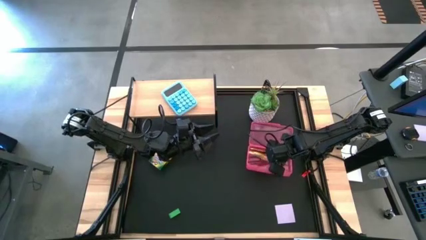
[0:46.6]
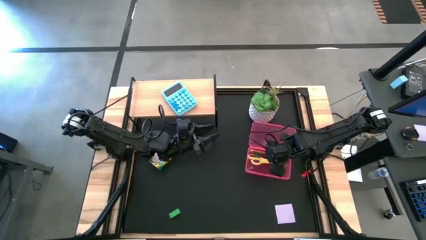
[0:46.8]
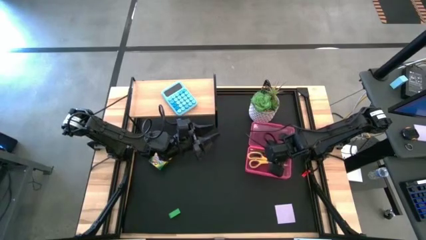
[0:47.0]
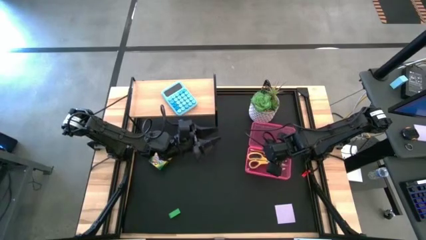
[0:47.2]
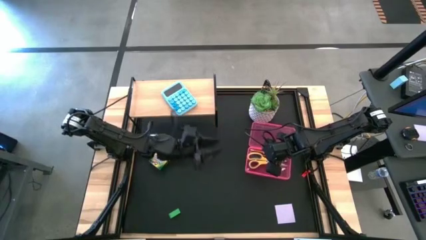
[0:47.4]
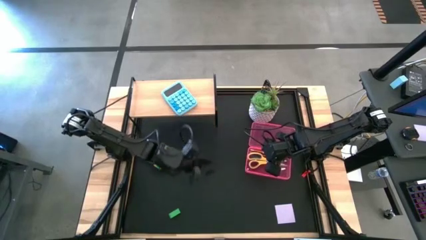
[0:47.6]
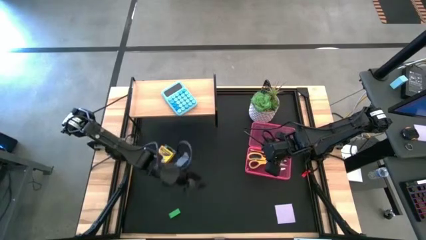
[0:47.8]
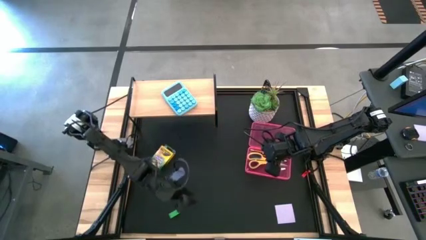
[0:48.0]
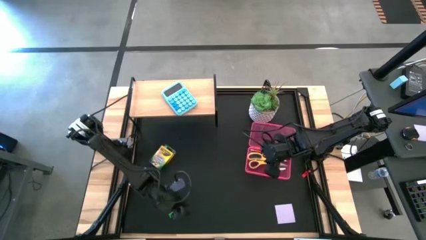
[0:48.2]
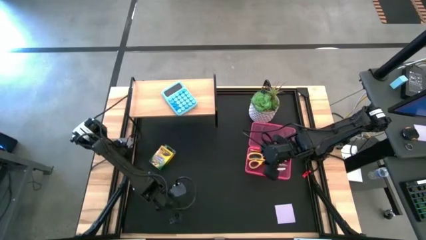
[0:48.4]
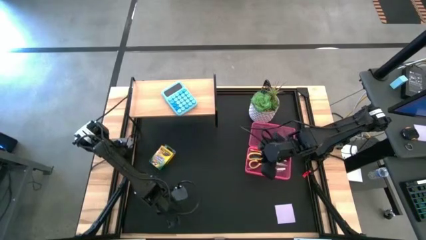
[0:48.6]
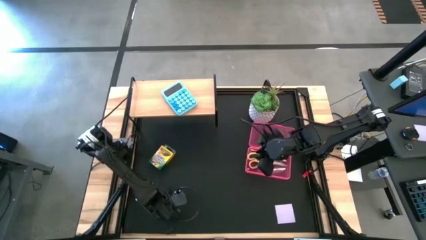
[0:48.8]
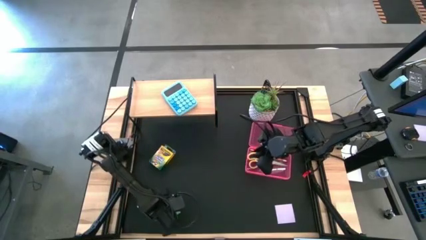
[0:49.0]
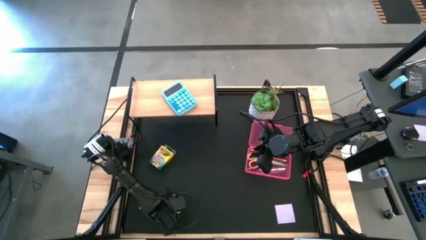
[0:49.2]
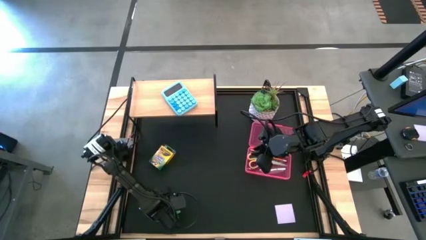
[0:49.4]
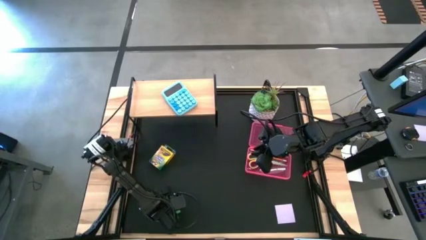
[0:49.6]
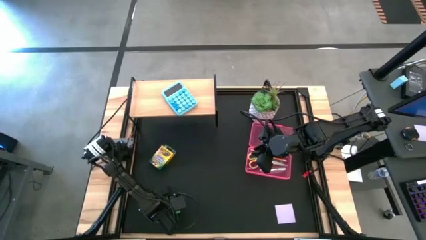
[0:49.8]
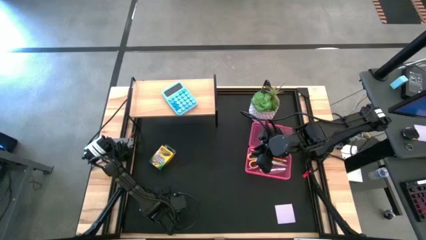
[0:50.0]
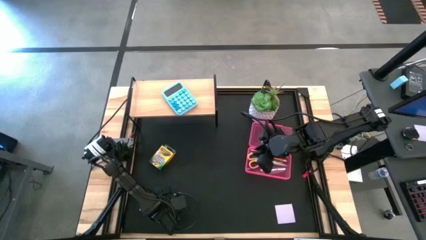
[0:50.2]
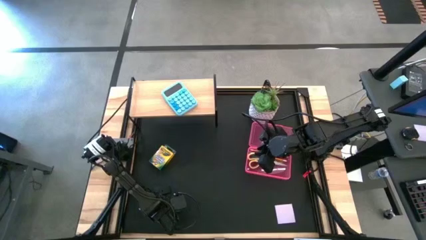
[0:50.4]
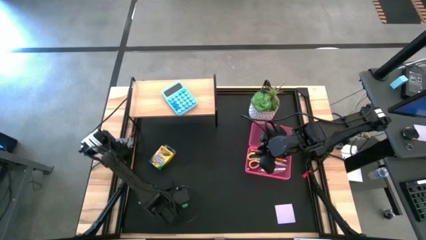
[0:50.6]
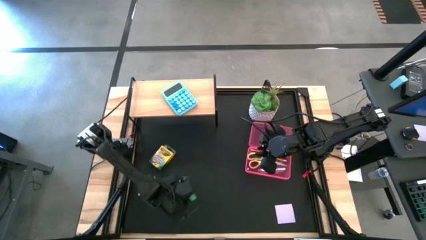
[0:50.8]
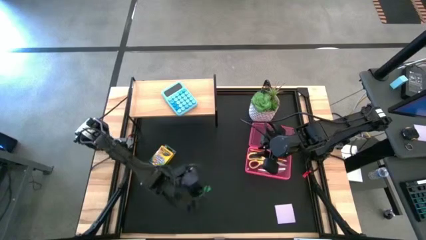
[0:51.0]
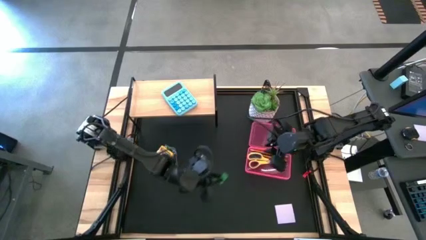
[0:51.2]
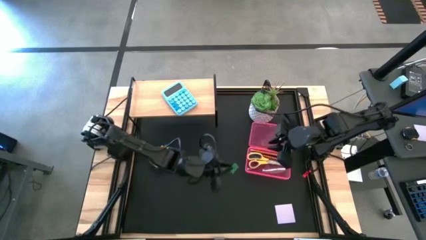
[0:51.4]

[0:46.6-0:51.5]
Task: Pack school essentials
Put the green eraser into the pink supply box

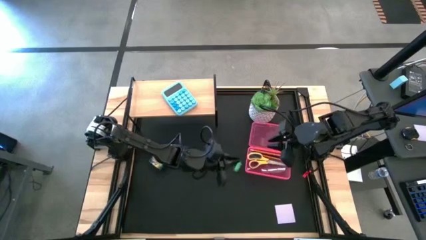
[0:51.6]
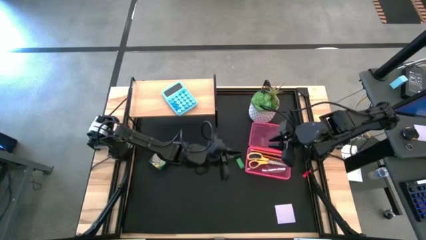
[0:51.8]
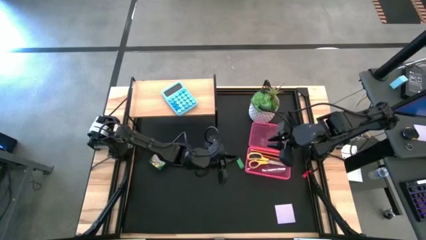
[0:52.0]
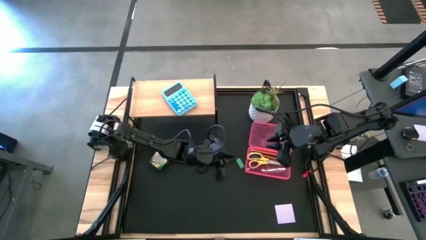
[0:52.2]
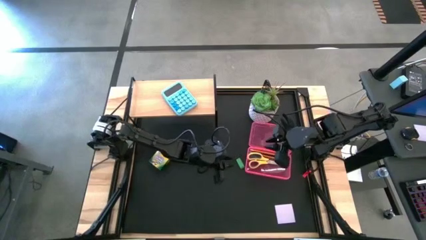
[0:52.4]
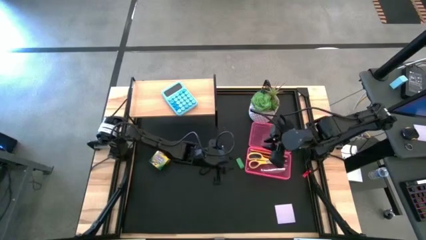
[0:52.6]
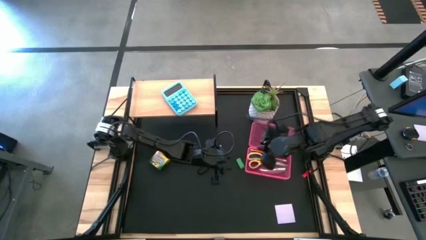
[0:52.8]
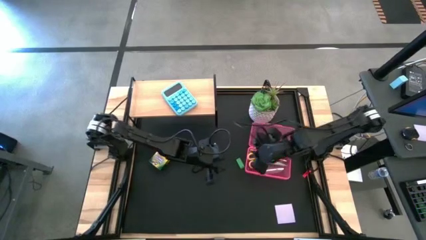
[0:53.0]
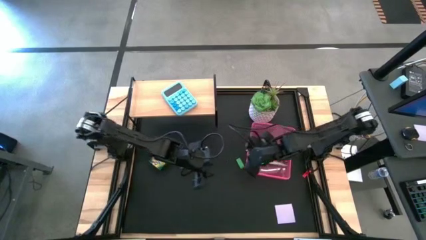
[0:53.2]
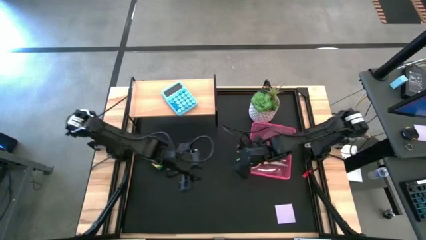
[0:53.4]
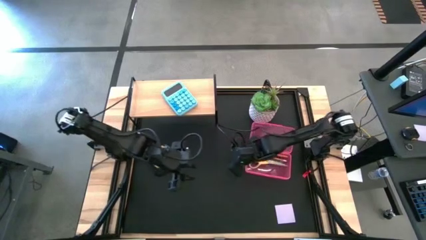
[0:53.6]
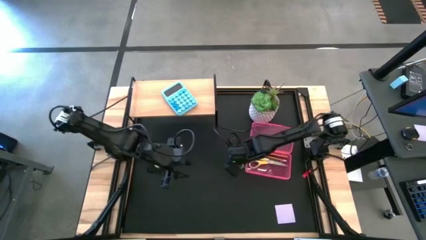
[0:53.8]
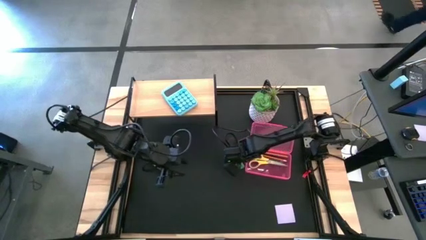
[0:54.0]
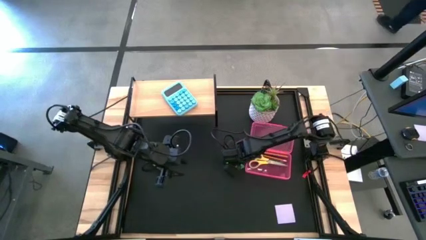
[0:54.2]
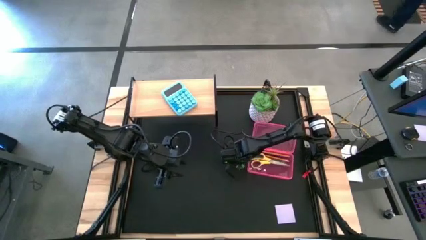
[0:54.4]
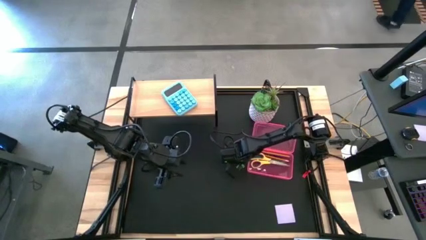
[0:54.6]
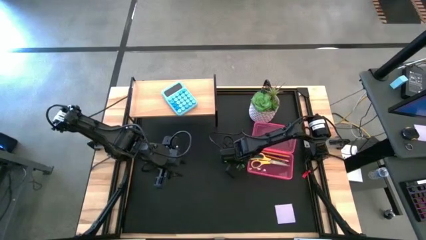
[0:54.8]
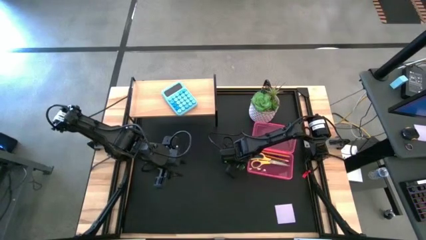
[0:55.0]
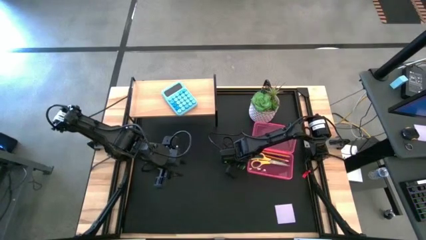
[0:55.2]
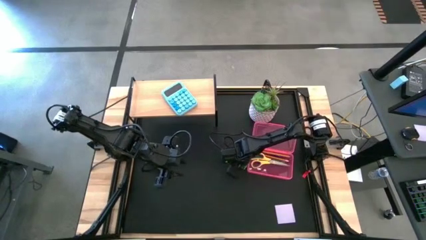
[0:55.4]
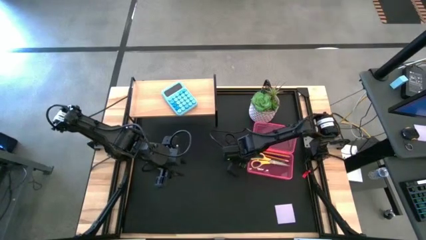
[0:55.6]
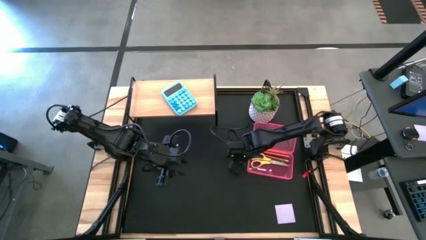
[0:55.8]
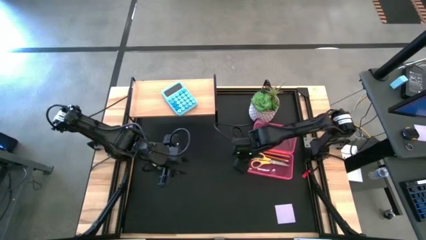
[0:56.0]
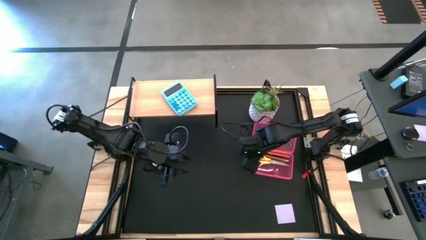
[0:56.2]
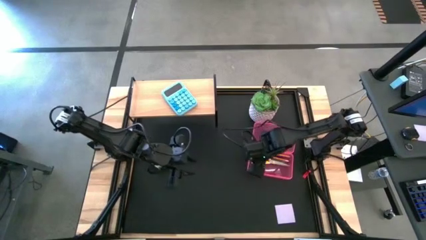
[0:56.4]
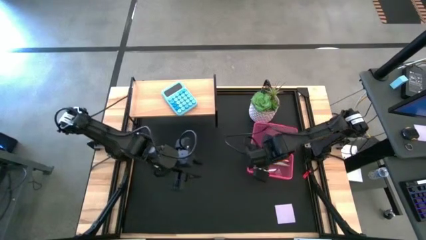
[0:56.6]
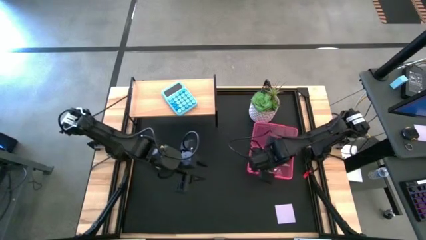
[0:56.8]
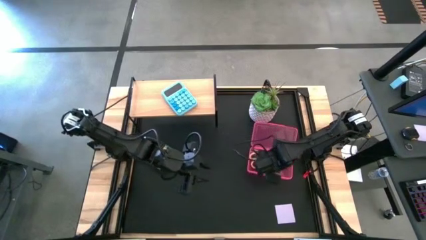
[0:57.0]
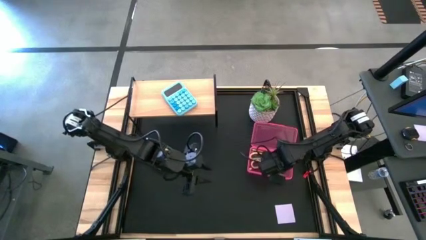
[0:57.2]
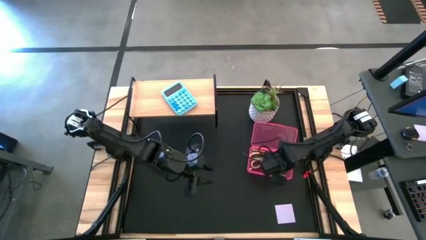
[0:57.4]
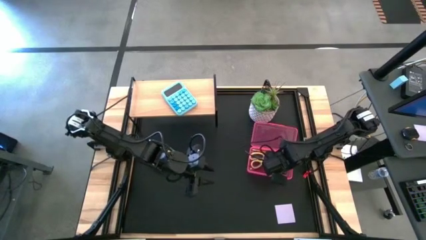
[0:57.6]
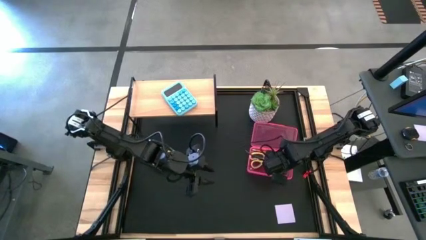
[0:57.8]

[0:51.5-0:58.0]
Put the green eraser into the supply box
